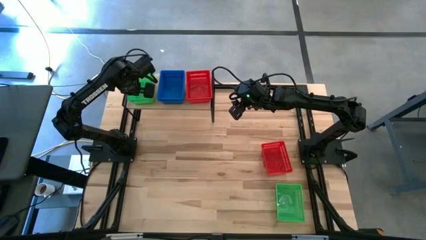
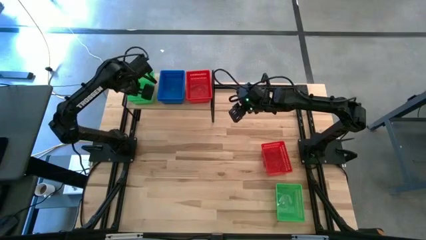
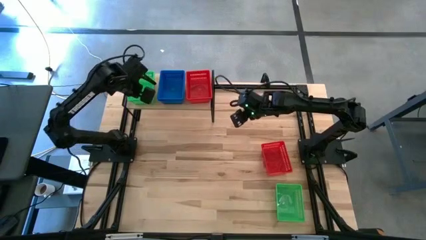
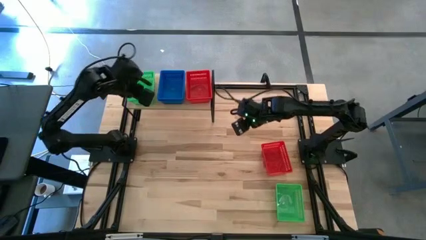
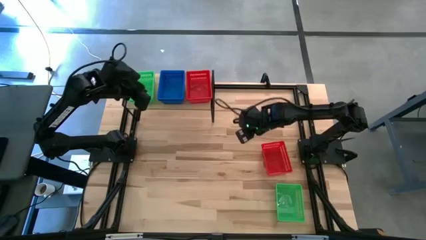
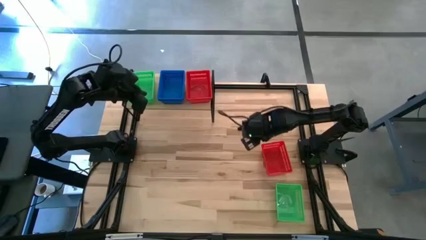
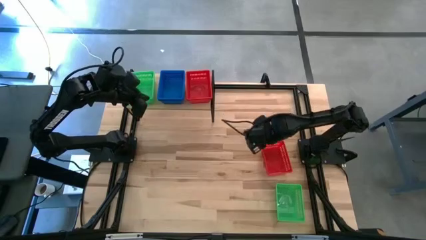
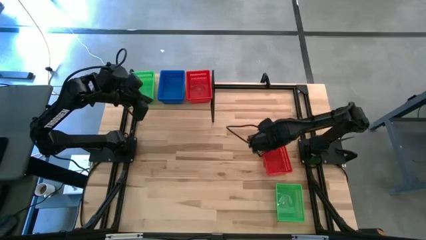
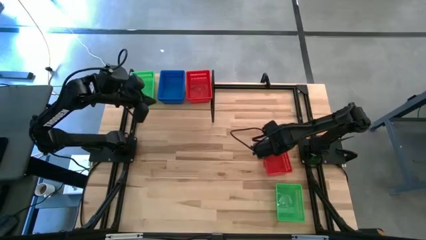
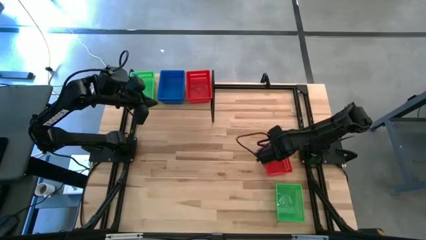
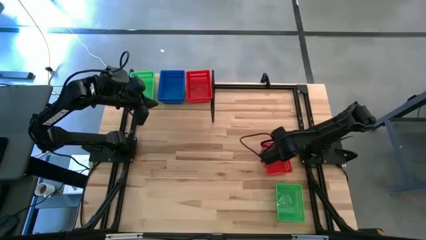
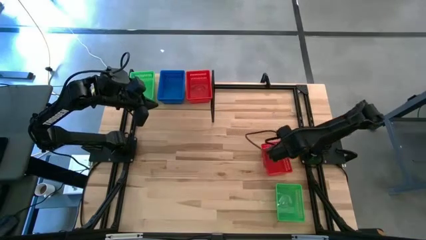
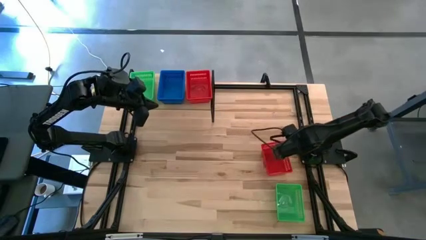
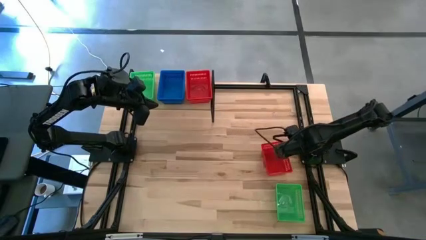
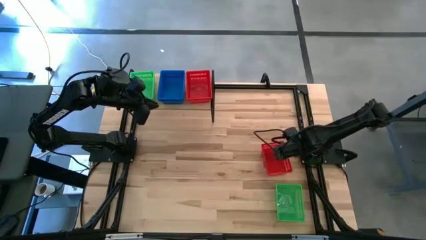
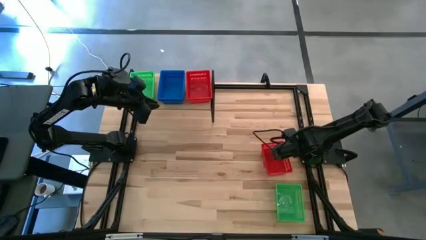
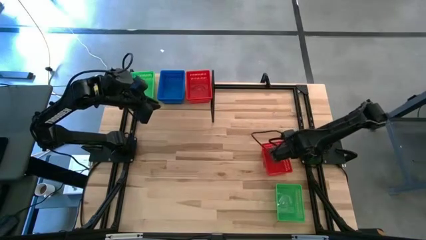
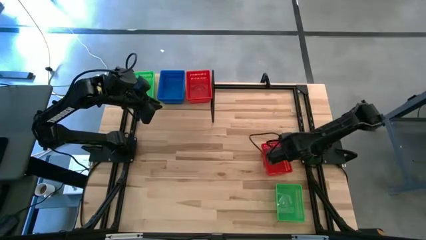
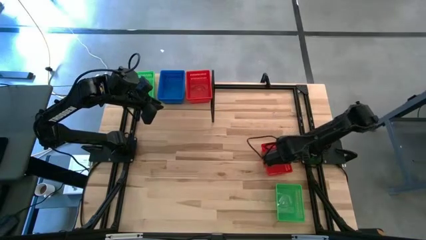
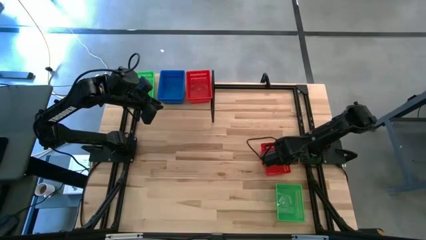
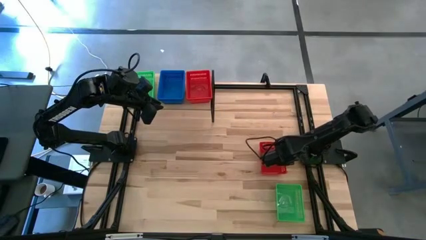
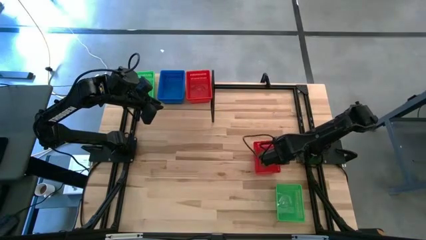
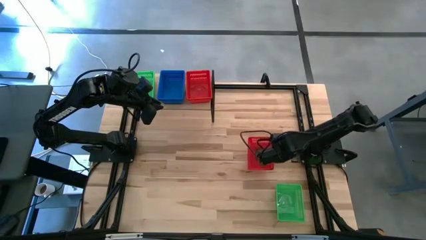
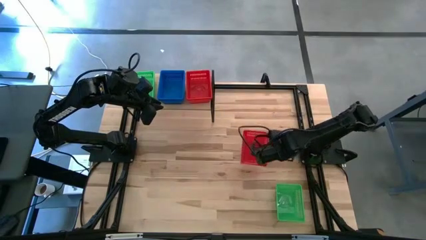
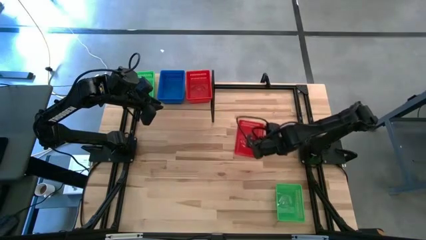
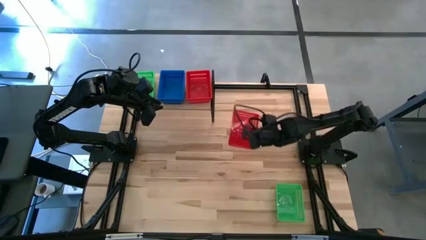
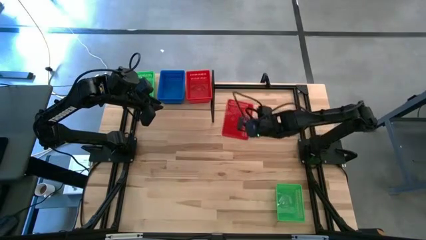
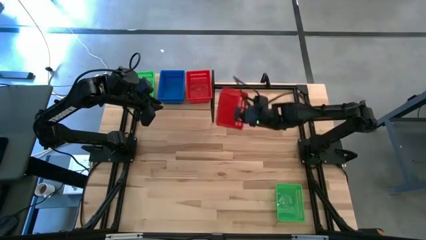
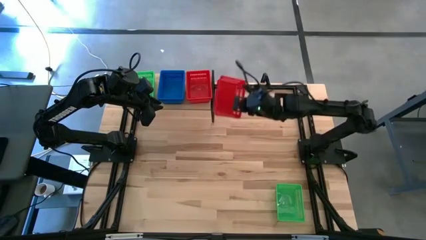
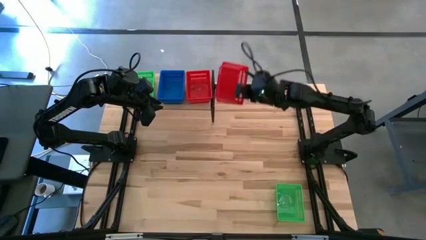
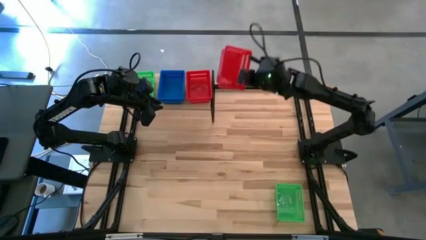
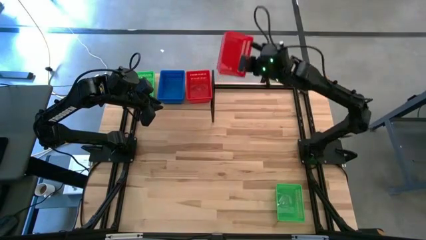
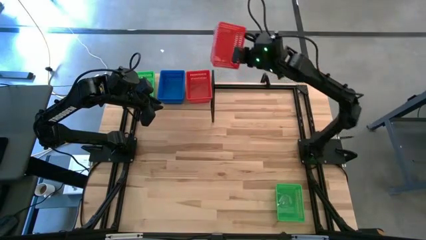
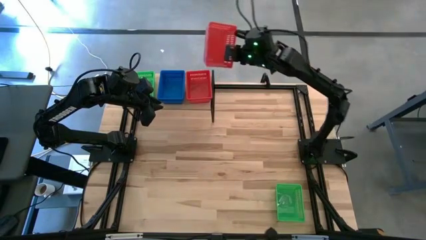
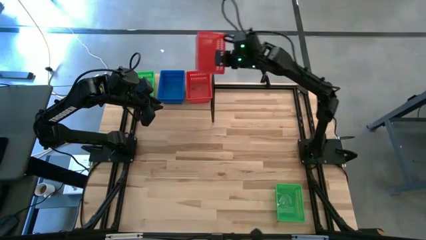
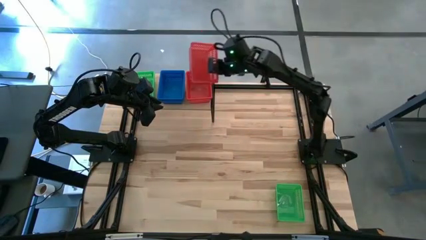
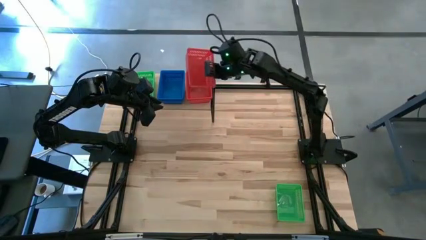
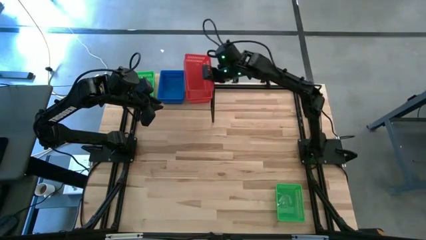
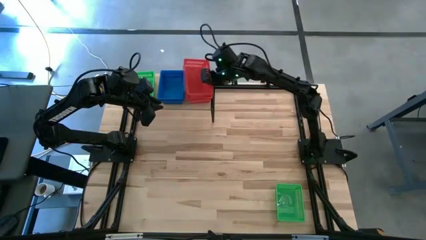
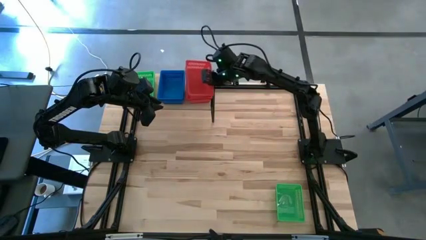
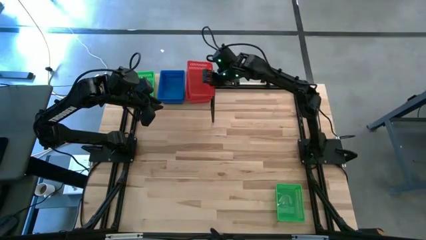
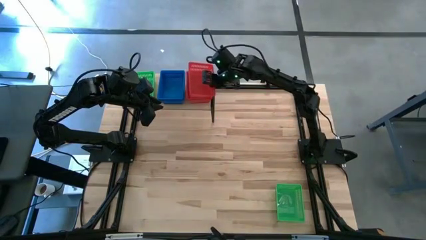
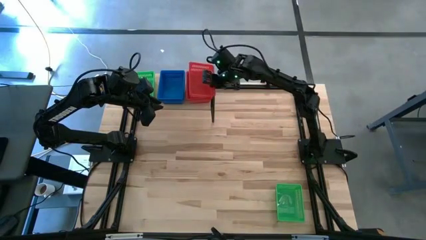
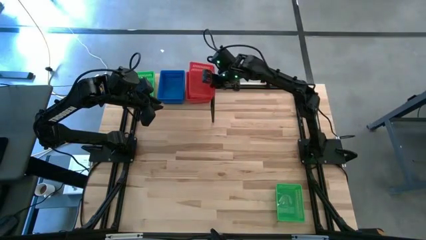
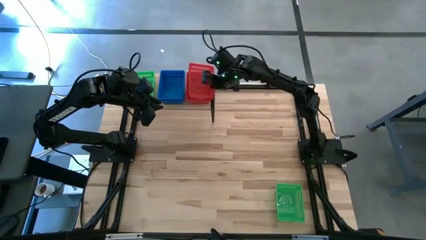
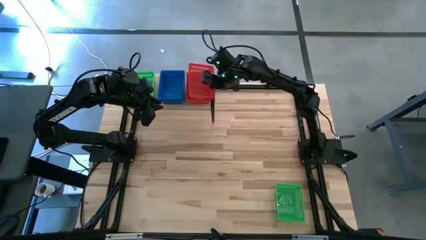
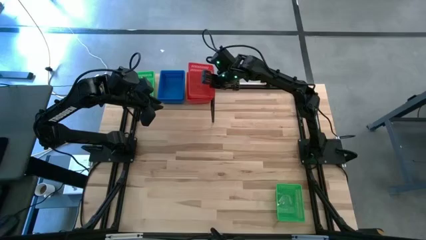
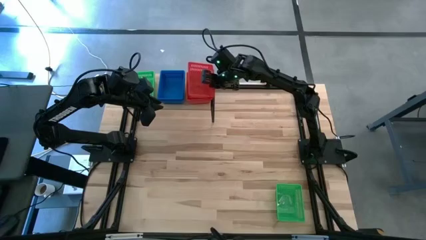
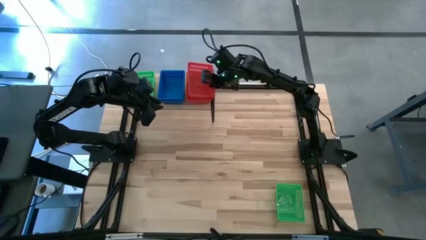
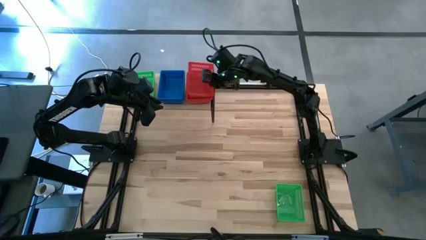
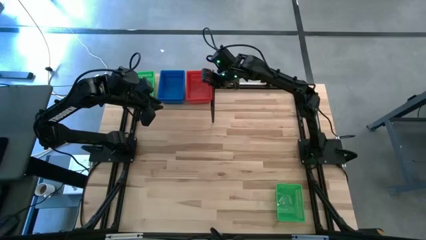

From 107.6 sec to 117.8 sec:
Task: Stack baskets on shelf by color
Stack the red bin on top of the red bin on the shelf

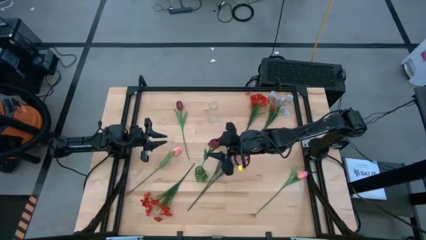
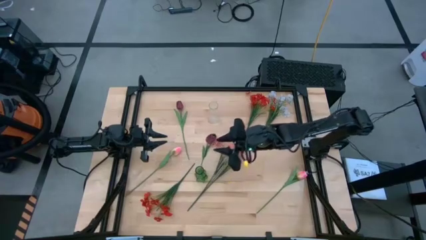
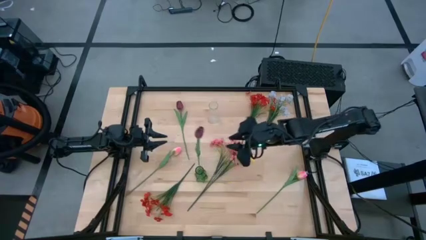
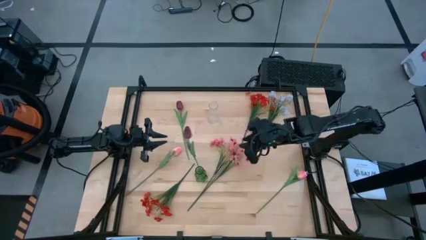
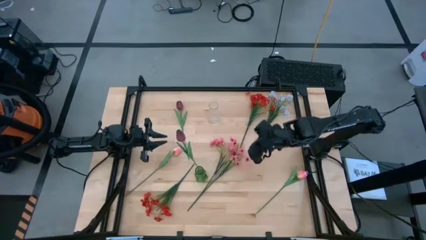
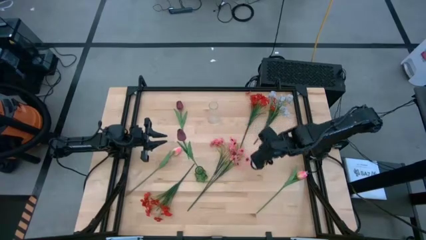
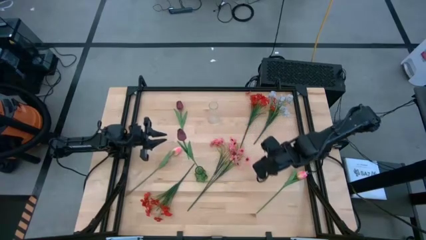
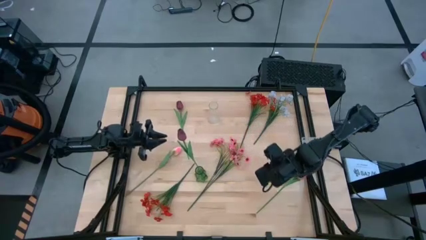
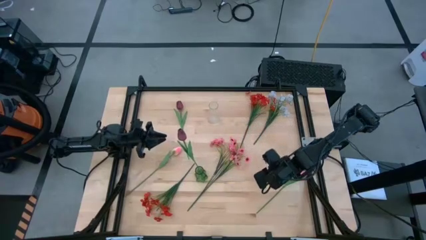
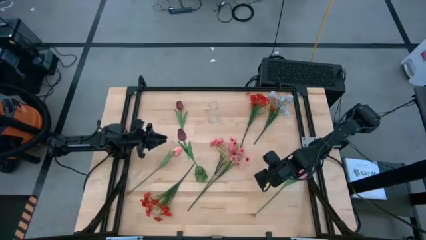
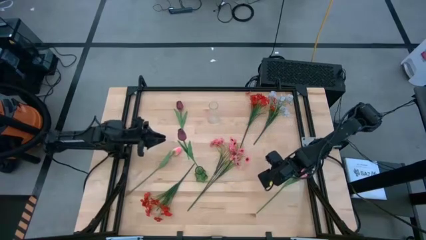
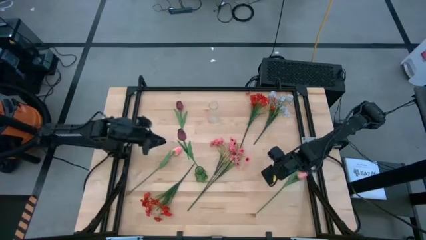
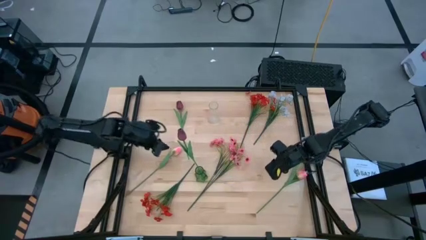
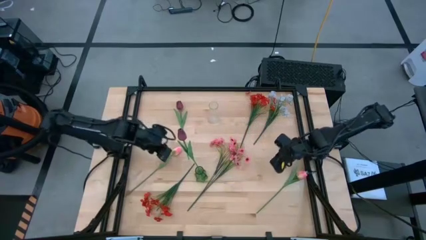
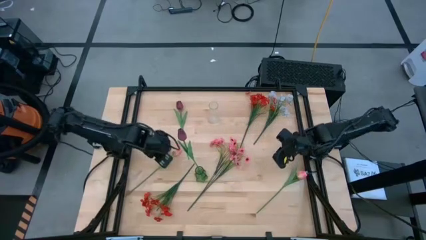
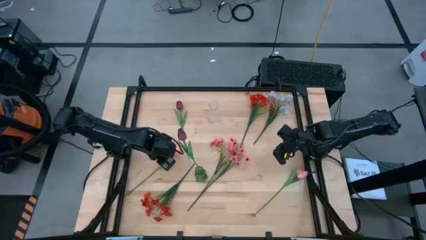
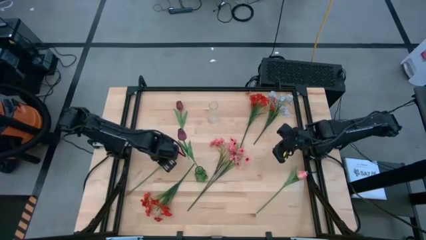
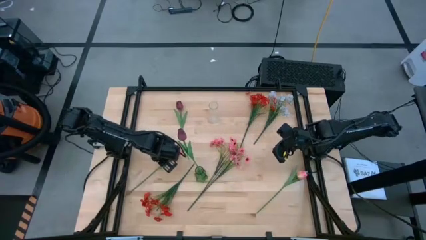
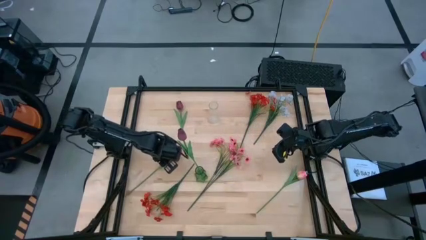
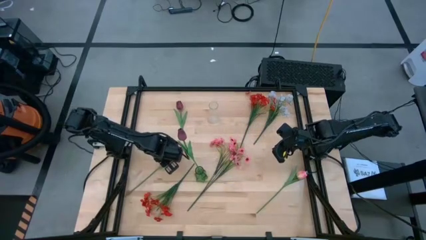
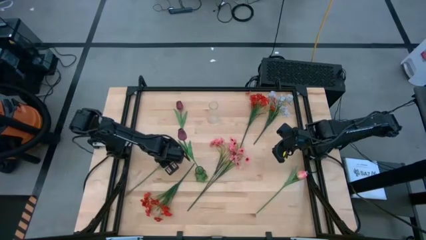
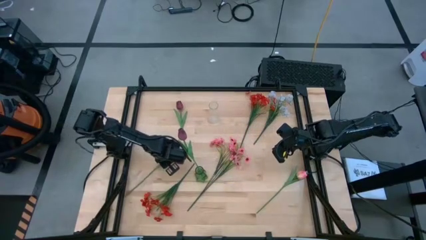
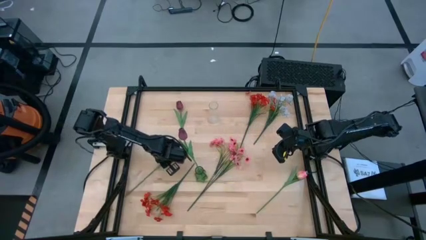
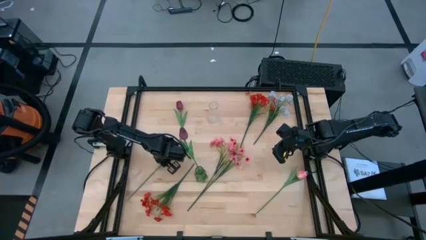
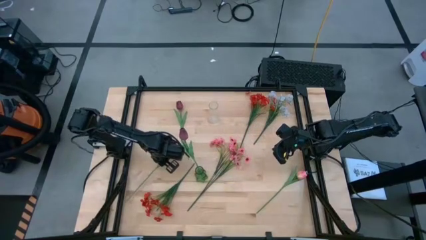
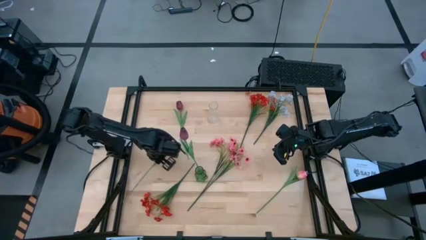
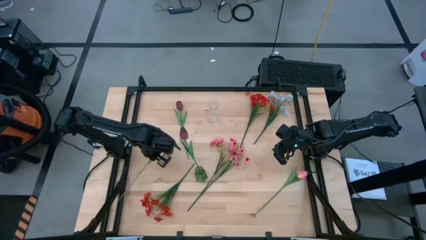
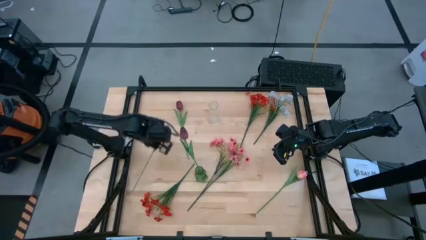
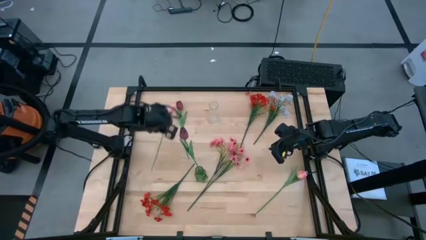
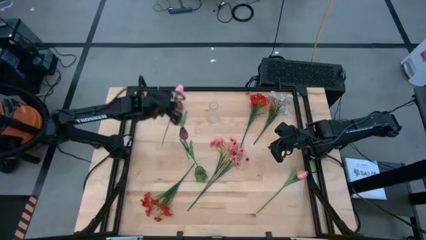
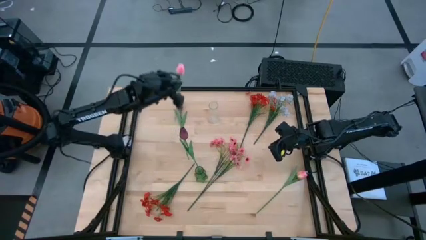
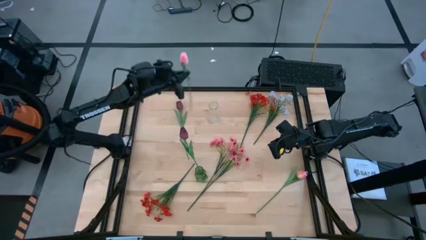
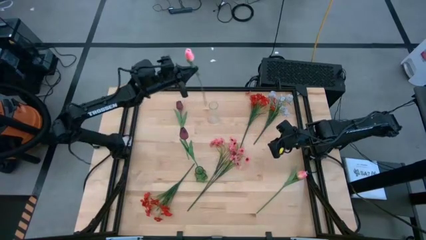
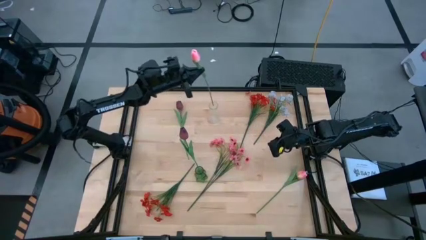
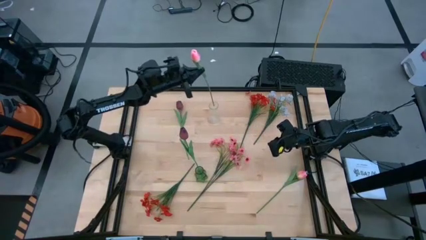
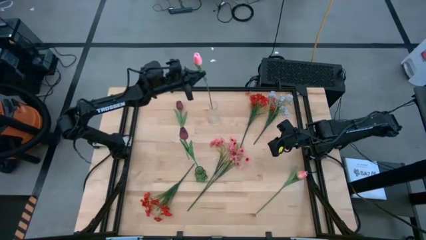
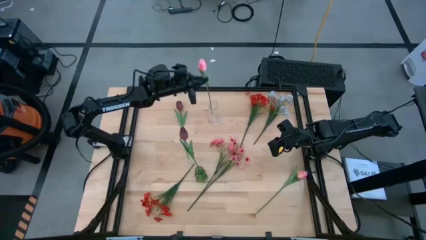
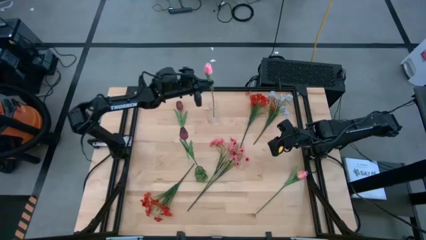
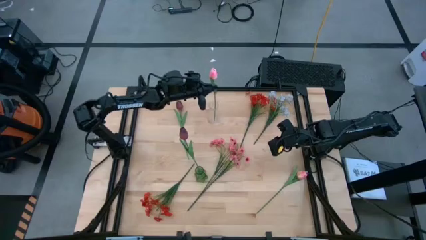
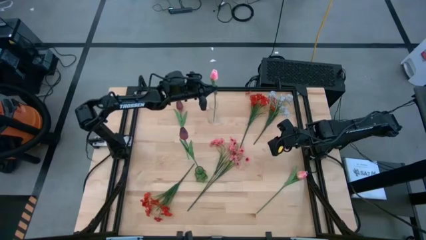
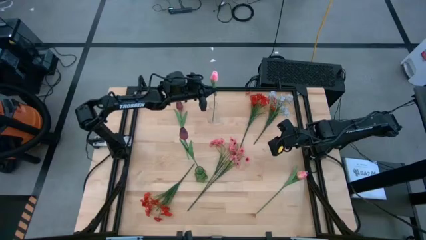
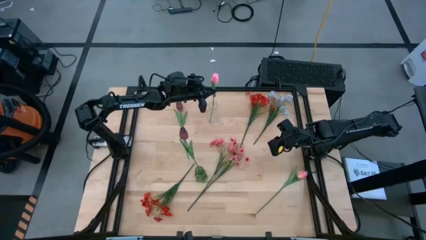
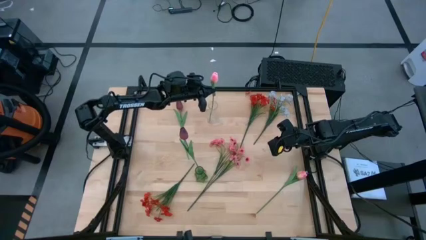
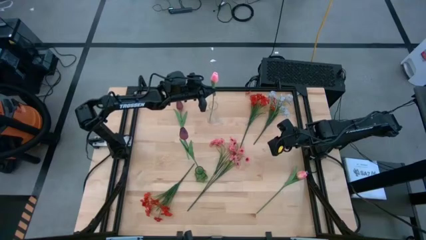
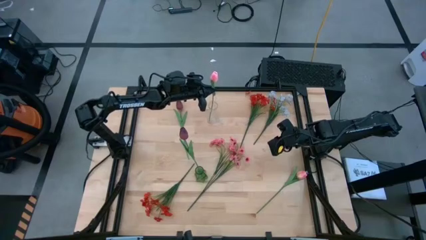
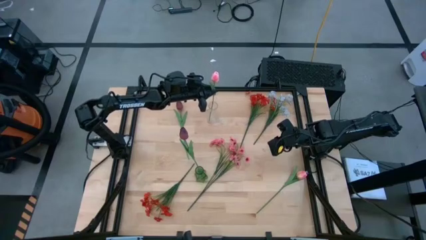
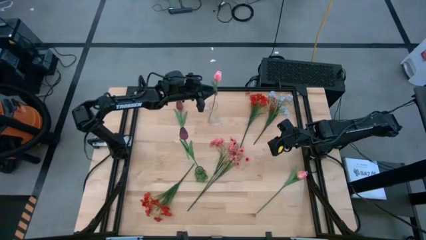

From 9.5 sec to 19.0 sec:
Task: Sort flowers into vase by color
Put the left pink flower into the transparent flower vase
